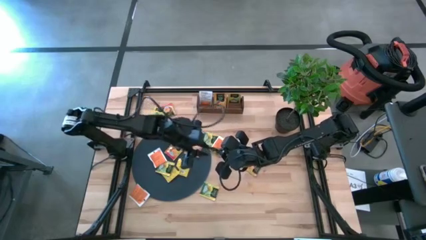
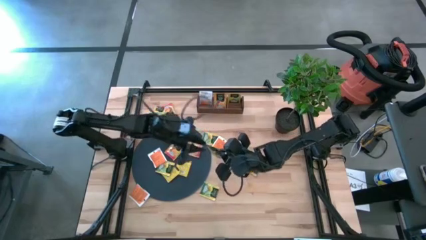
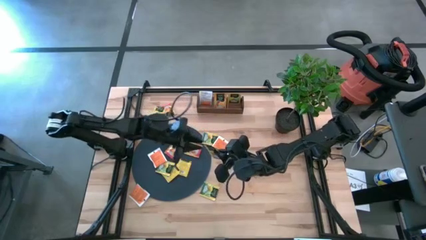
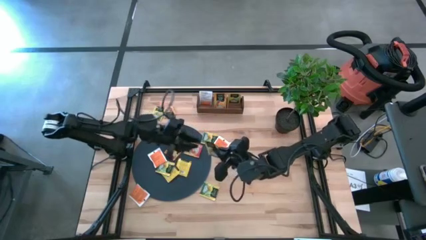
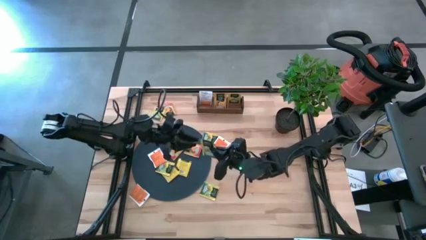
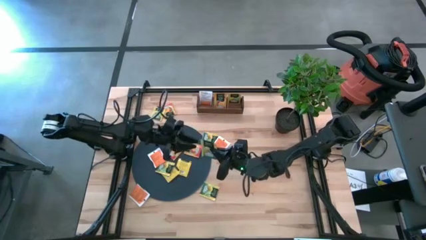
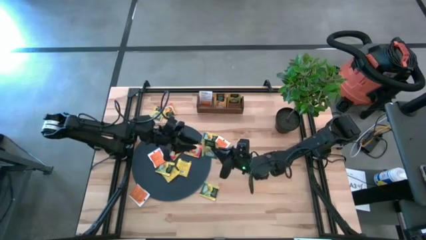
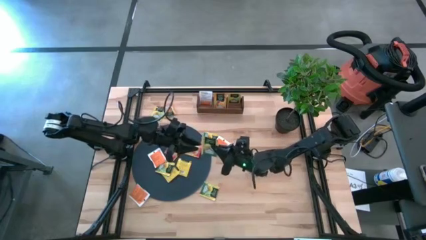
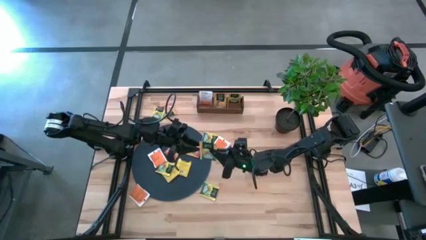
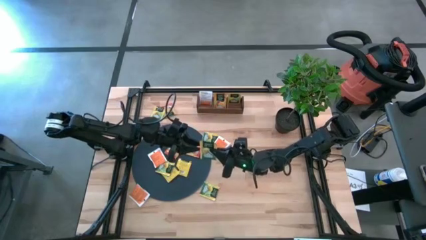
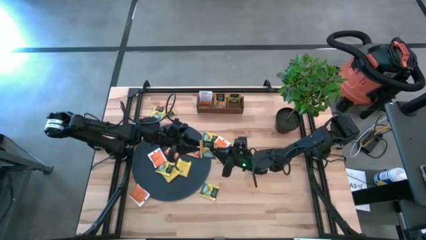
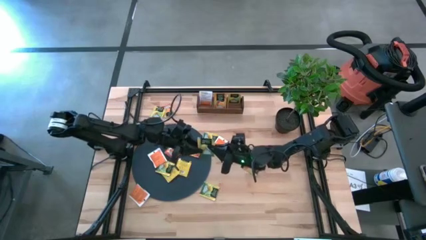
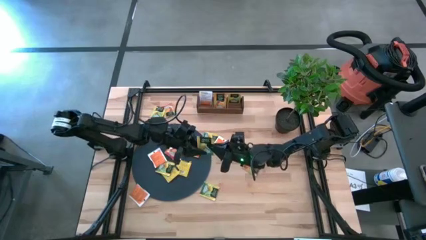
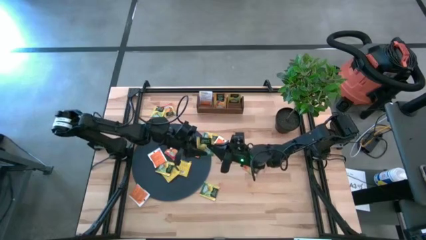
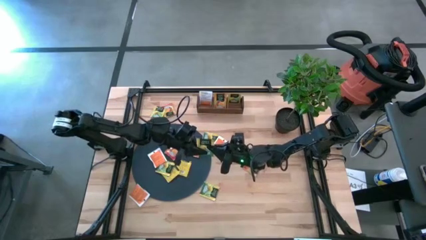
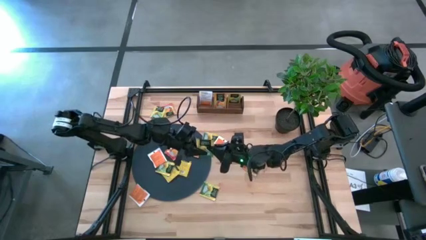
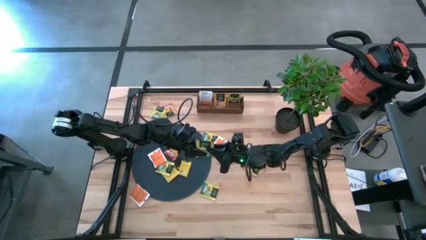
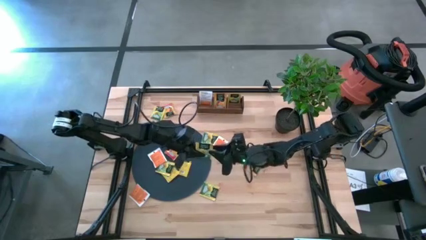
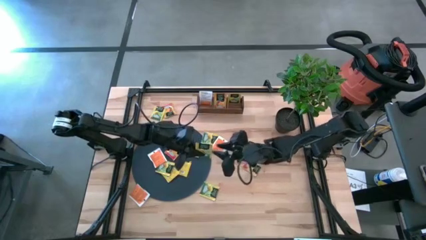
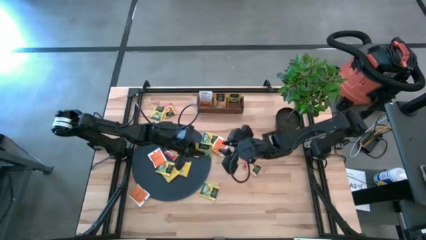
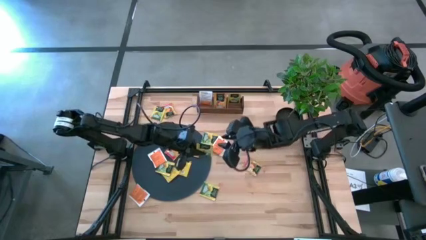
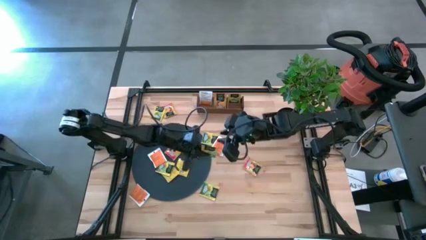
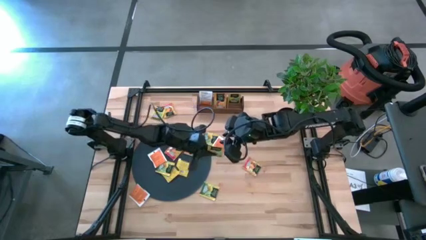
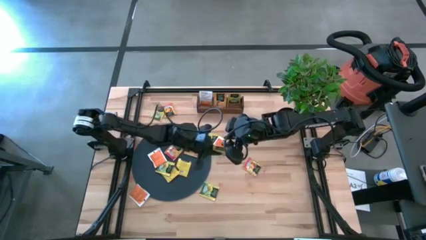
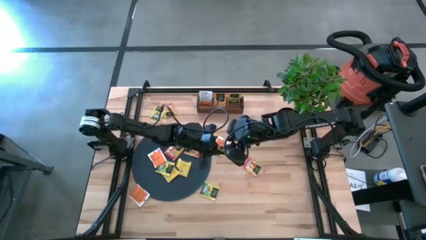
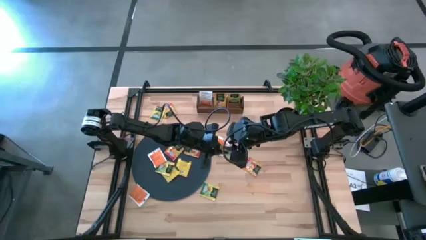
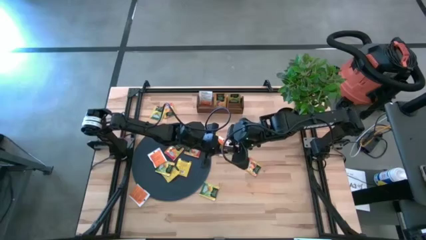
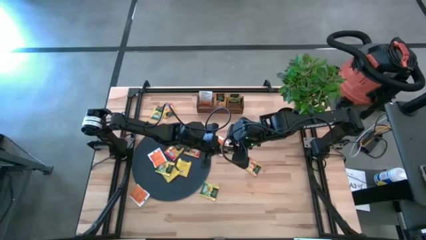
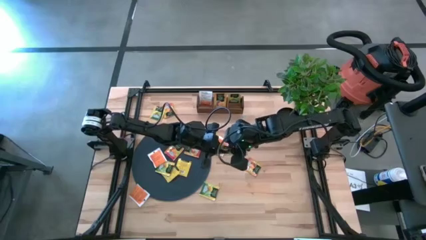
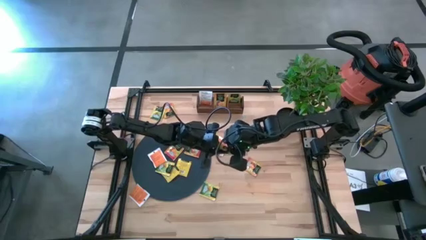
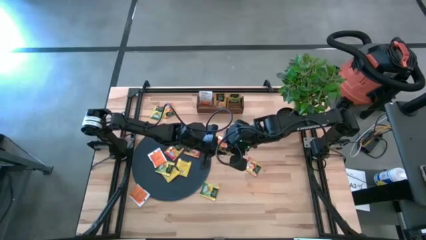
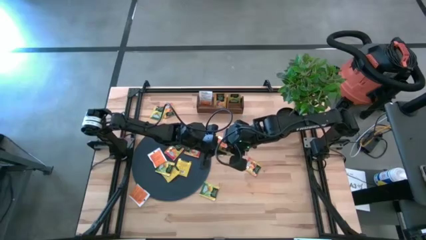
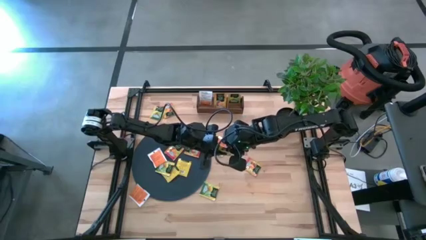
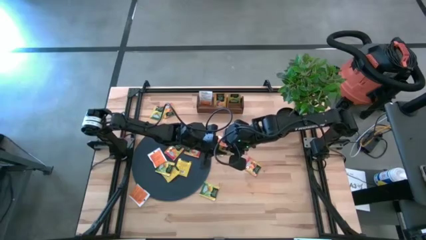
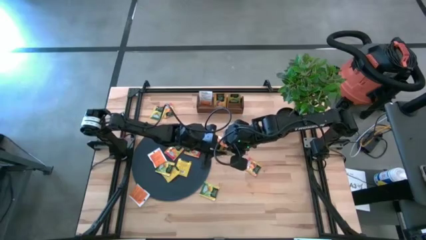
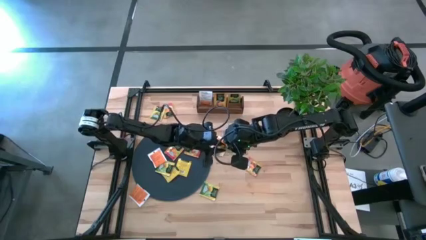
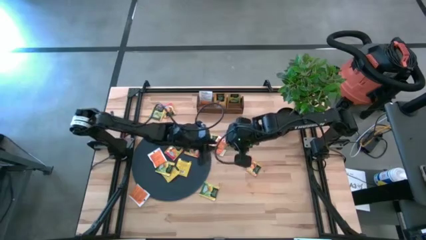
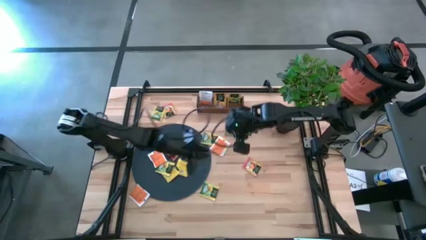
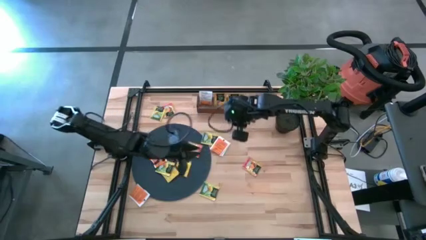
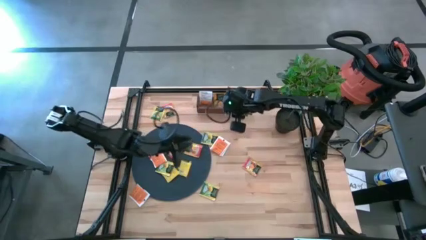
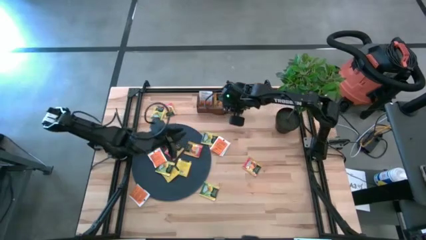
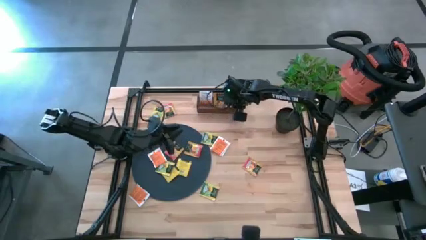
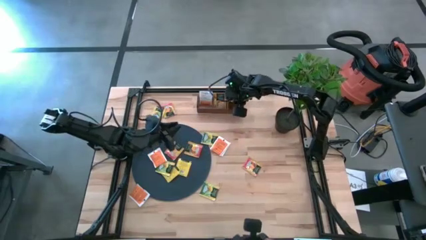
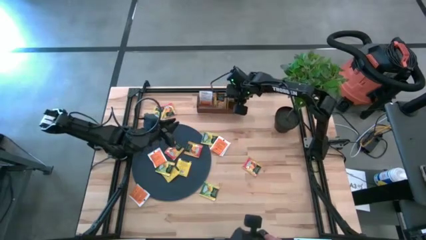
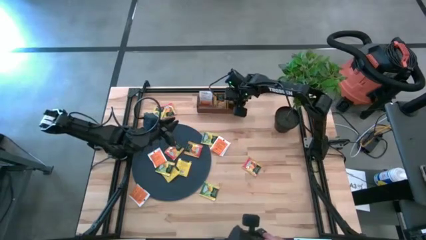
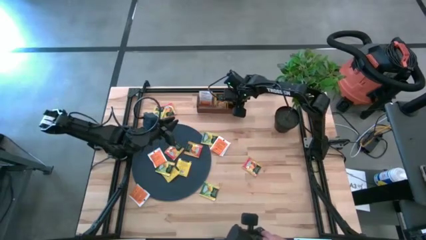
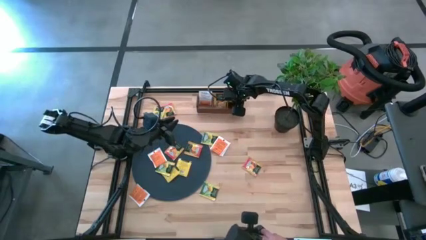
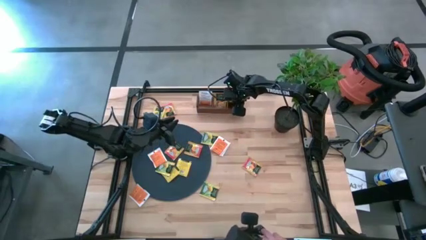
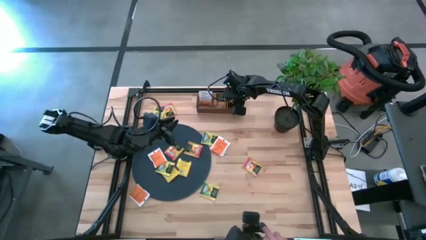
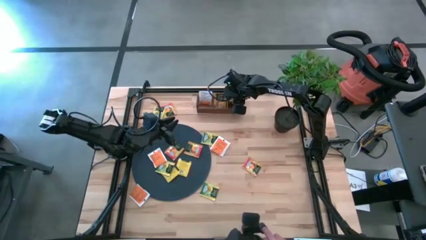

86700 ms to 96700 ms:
Task: Pick & Place Tea
Put the green tea bag into the right section of the wooden organizer

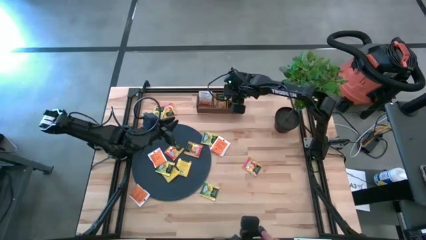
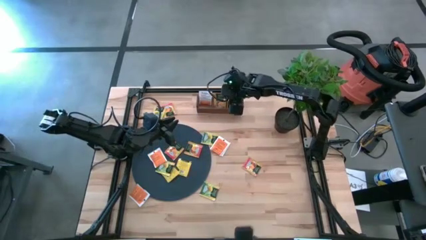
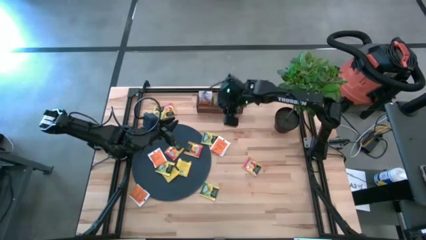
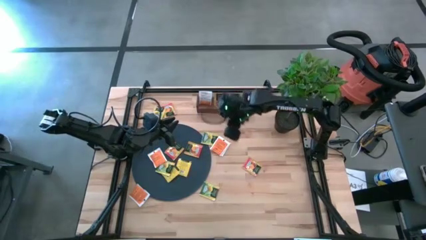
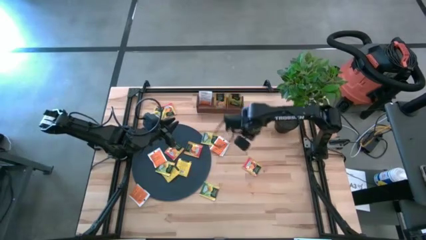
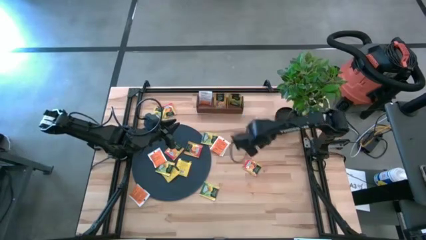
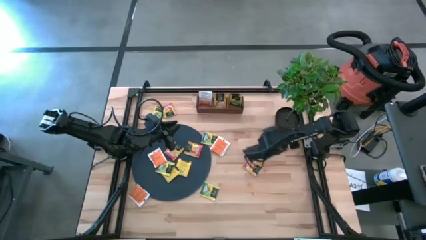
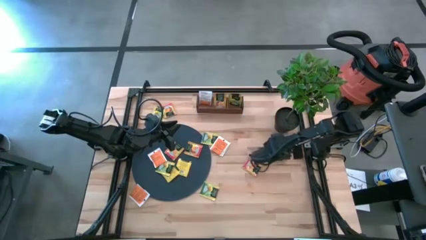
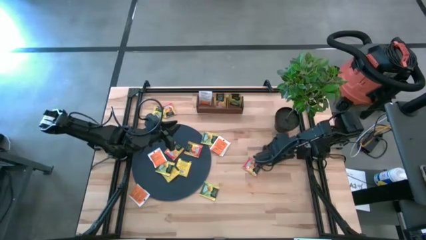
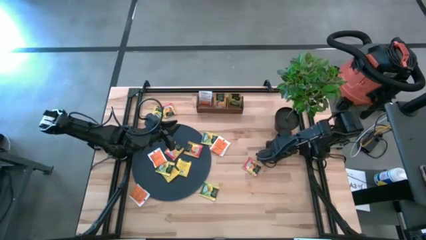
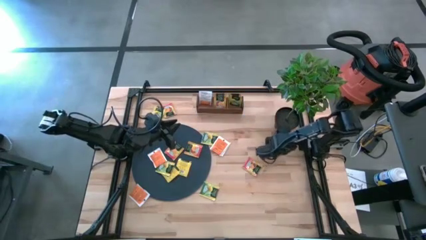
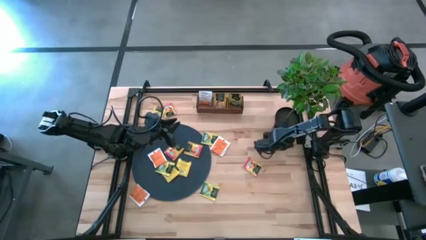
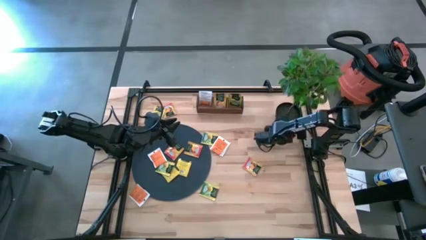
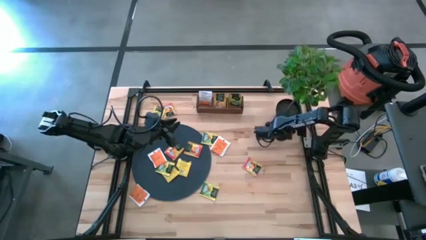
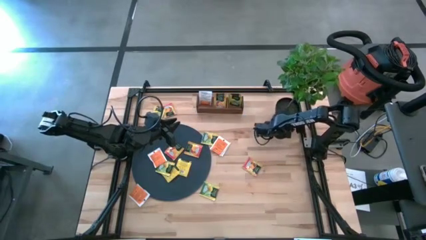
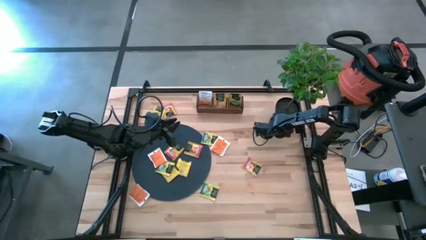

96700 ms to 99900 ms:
Adjust the black potted plant

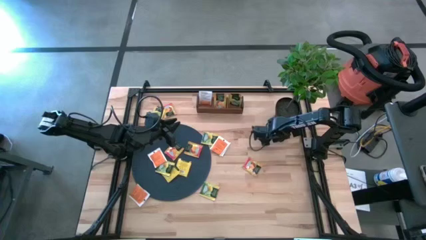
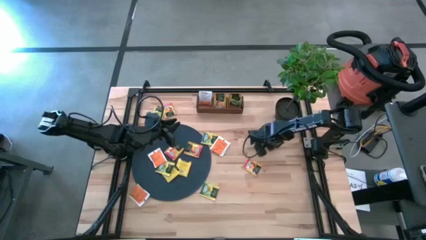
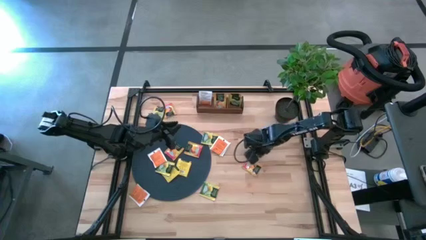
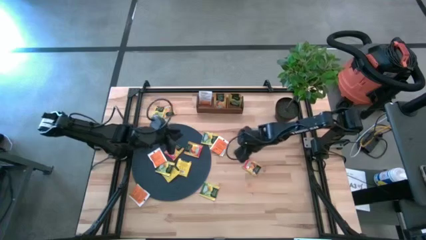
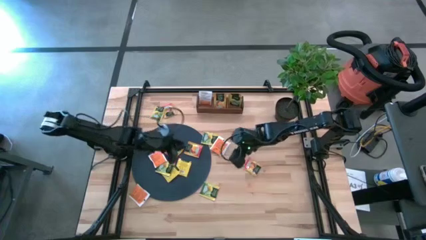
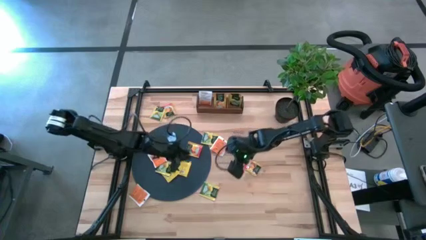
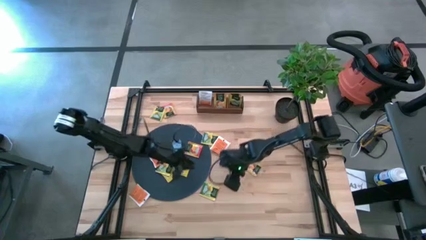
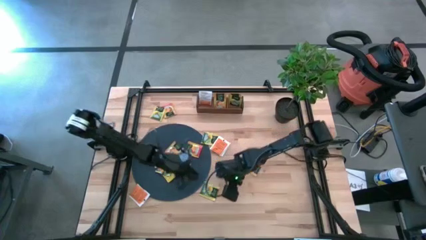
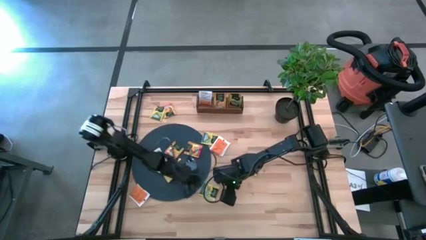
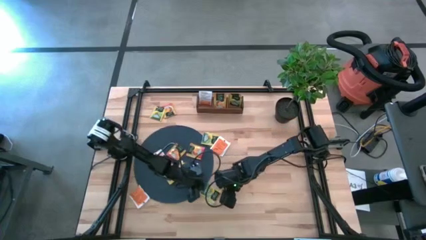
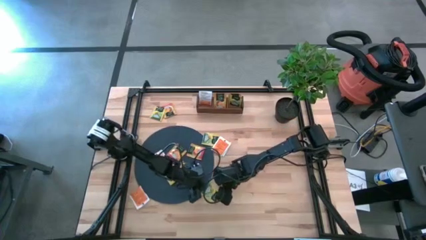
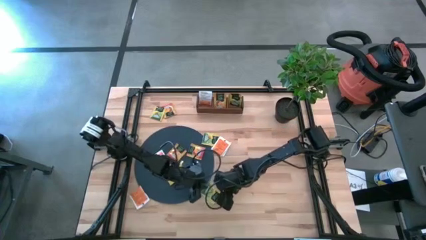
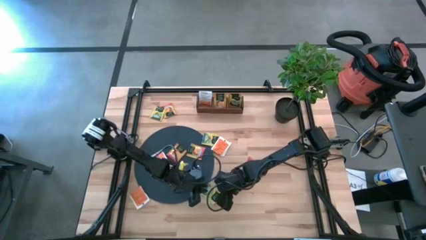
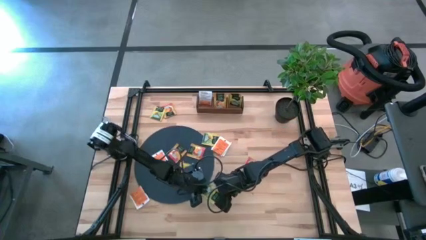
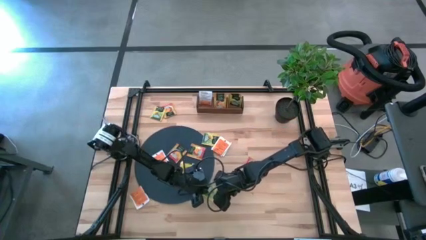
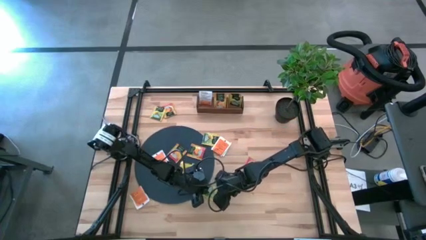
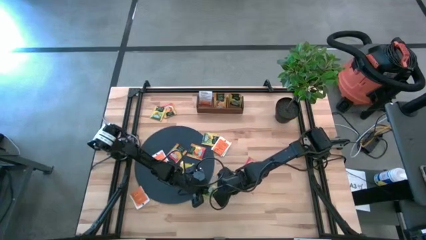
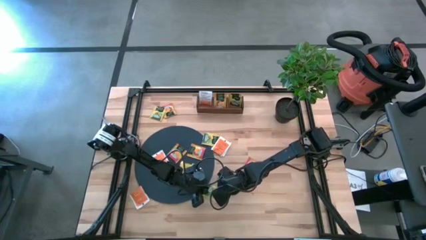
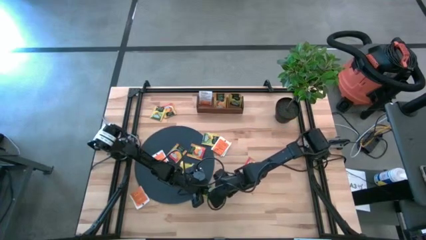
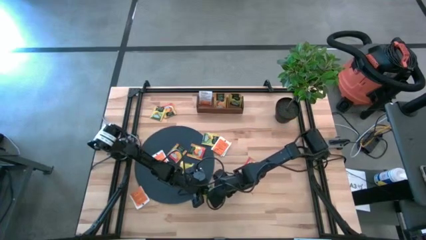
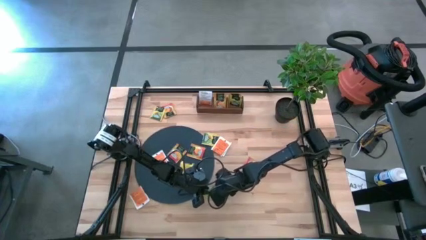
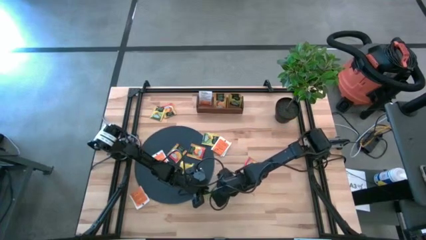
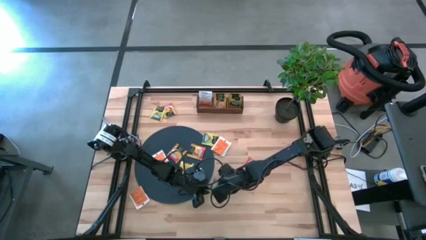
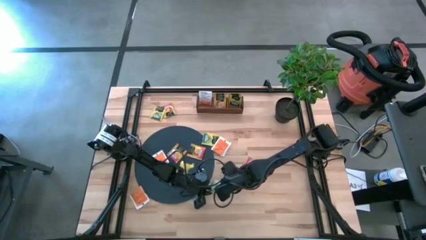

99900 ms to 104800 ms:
Put the green tea bag into the right section of the wooden organizer
